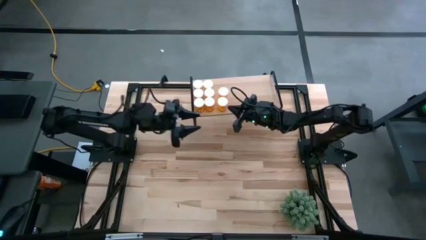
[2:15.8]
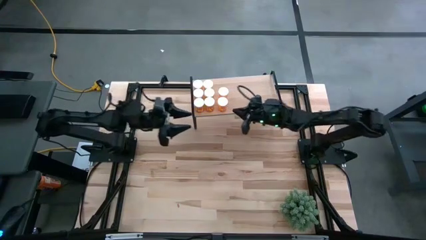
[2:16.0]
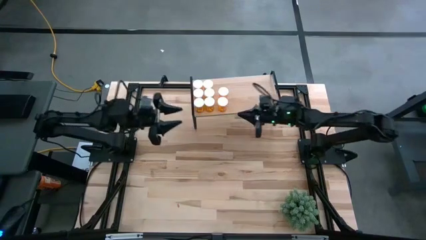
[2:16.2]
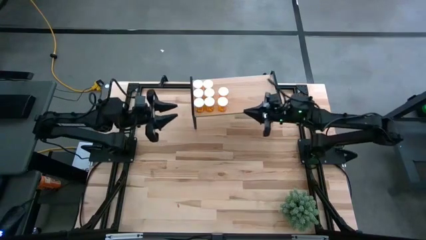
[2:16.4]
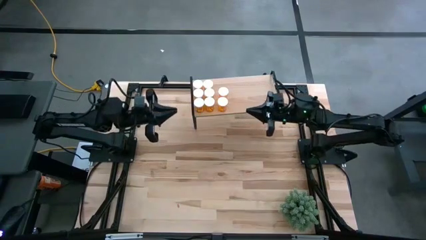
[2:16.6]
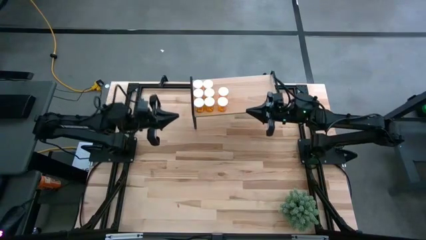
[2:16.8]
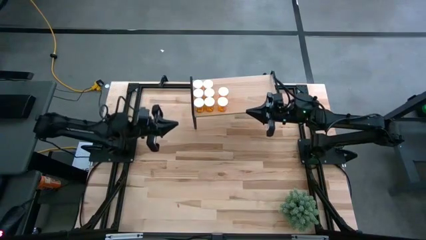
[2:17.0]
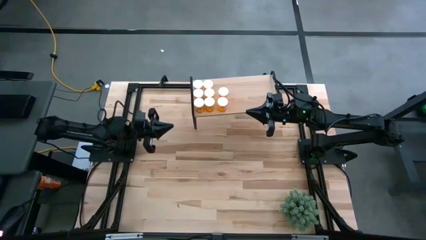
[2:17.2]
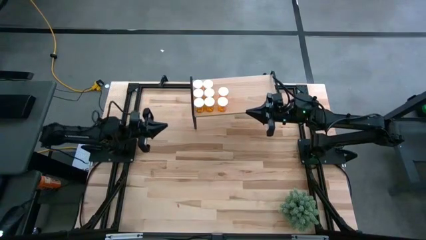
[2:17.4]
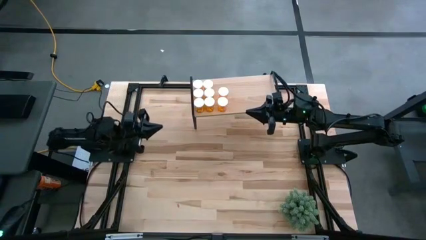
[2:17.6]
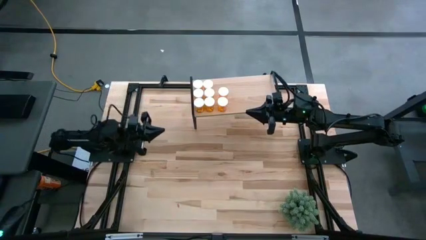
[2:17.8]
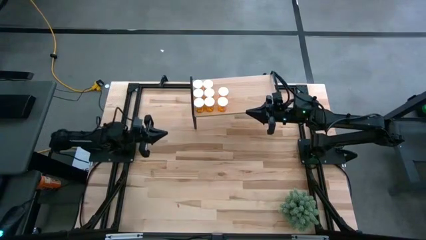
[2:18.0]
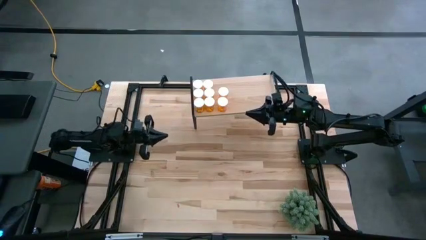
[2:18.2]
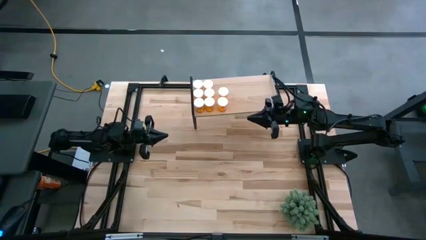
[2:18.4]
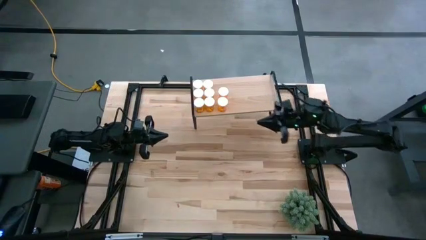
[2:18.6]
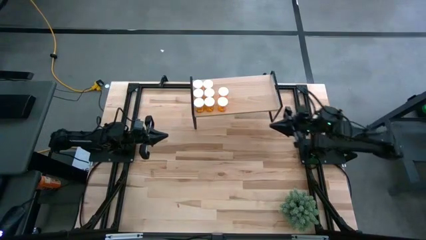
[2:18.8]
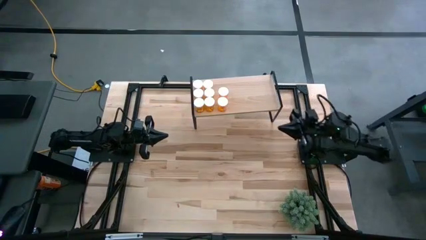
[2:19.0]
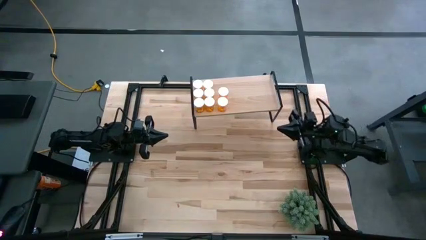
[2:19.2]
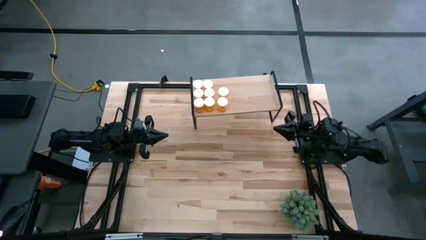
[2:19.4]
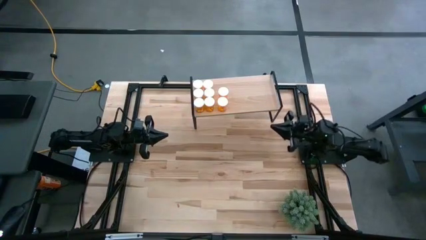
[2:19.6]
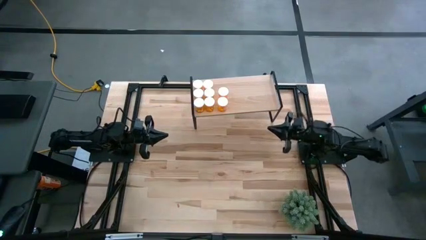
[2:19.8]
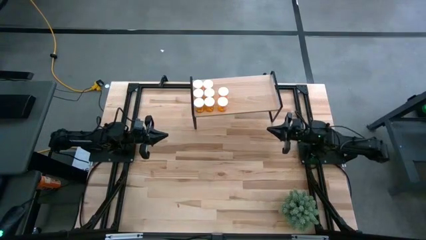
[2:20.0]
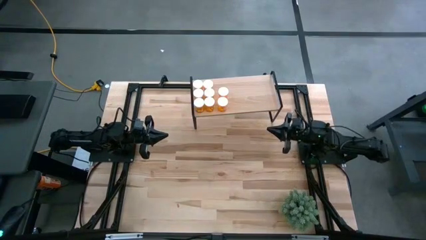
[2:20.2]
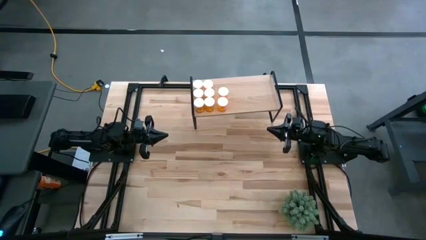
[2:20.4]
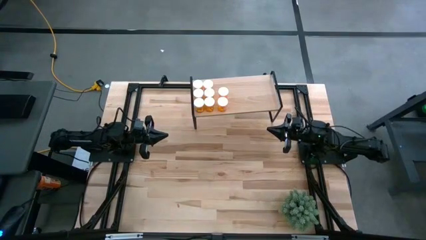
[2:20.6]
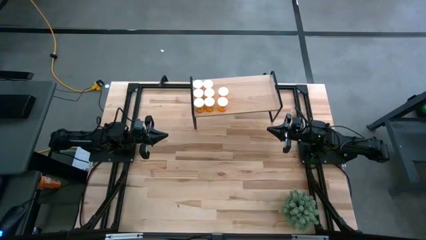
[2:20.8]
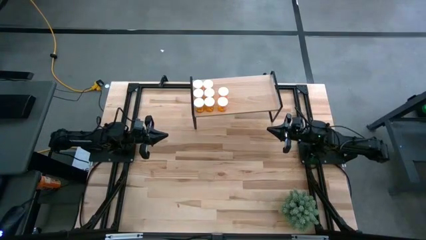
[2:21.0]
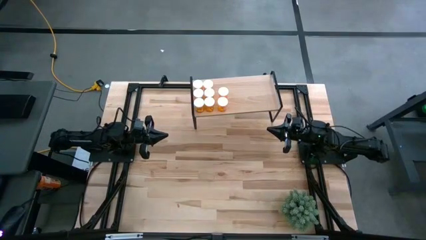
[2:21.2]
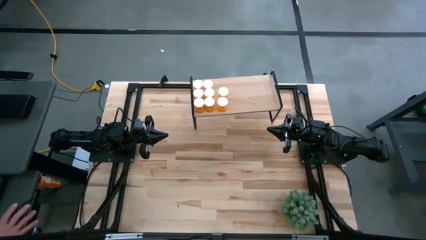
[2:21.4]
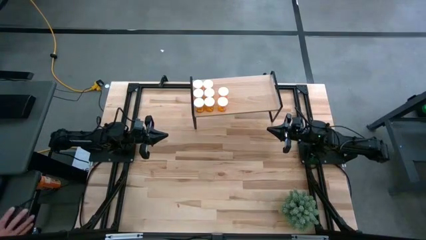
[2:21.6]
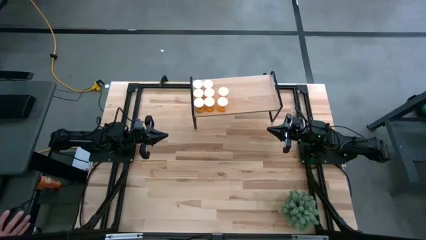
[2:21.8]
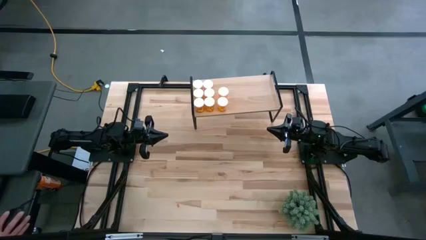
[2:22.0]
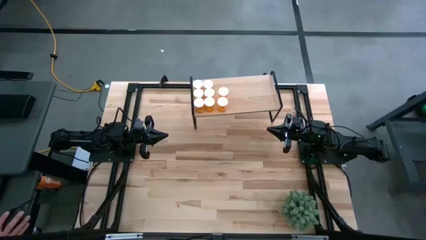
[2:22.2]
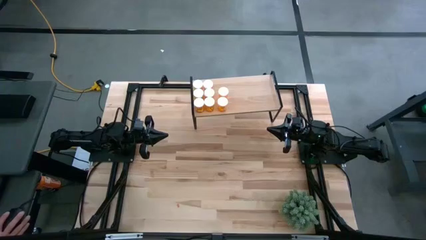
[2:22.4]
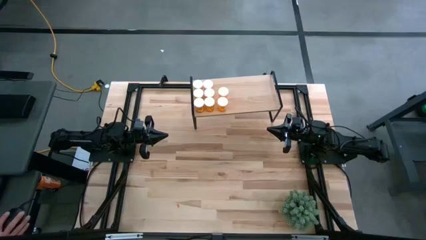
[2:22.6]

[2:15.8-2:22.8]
Task: Pick and place medicine bottles onto shelf by color
Return to Home Position

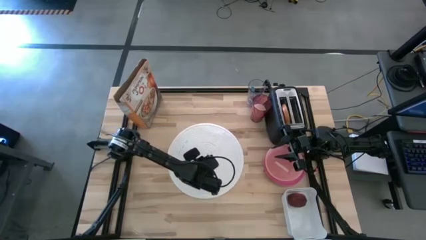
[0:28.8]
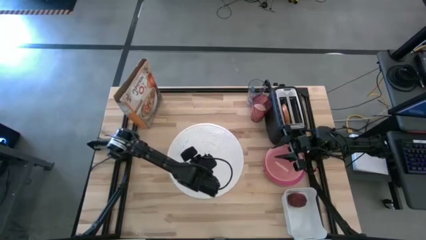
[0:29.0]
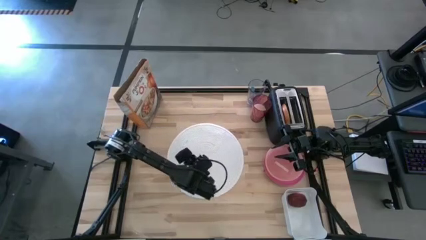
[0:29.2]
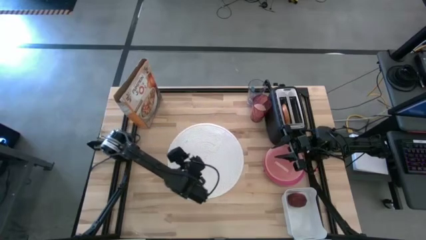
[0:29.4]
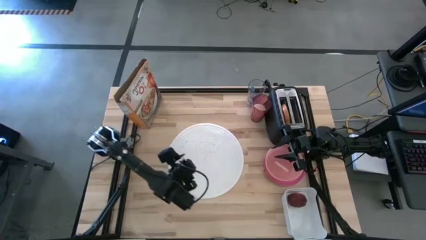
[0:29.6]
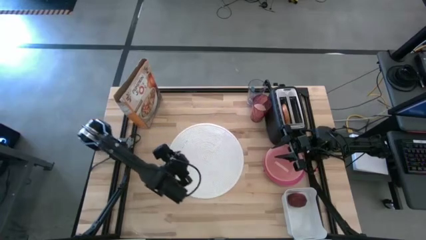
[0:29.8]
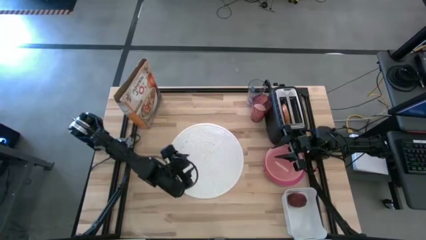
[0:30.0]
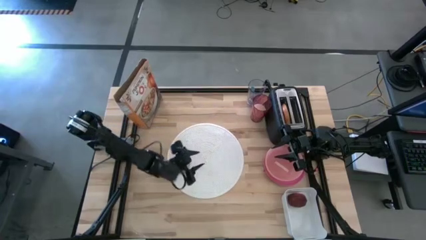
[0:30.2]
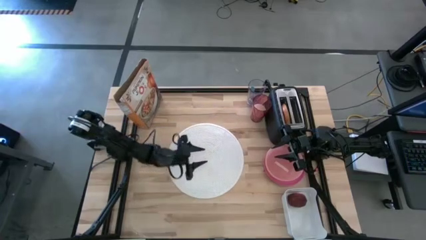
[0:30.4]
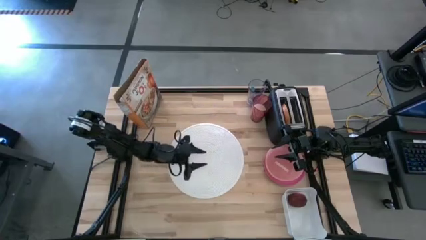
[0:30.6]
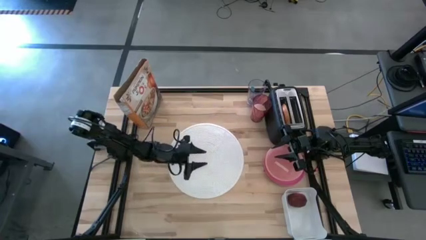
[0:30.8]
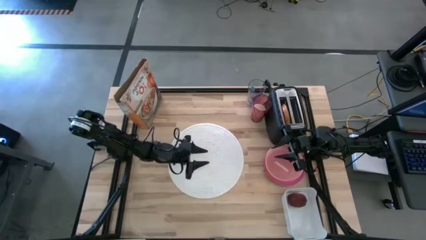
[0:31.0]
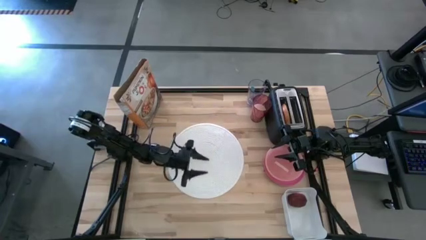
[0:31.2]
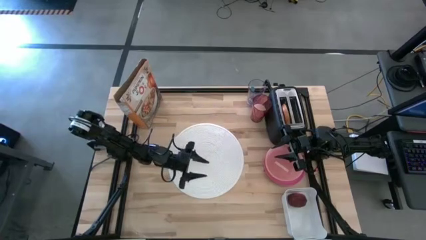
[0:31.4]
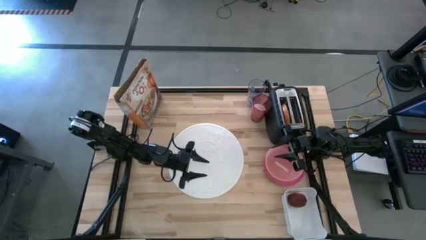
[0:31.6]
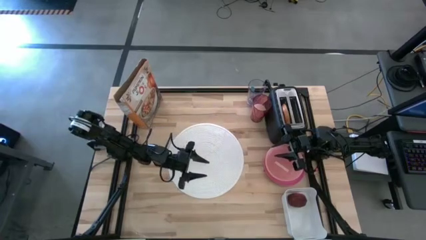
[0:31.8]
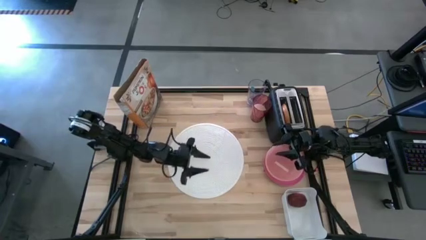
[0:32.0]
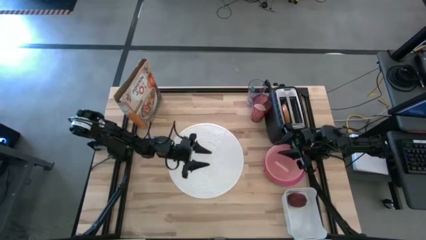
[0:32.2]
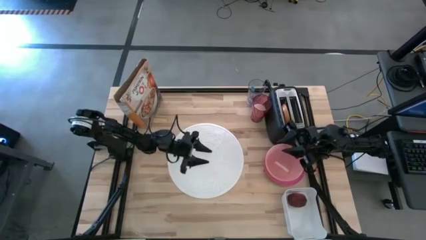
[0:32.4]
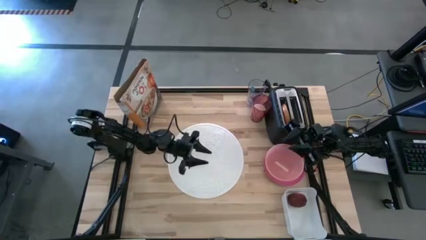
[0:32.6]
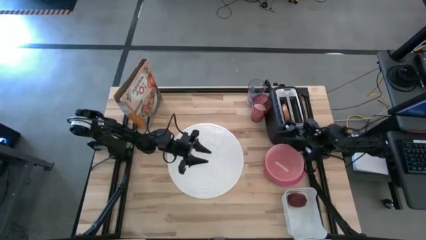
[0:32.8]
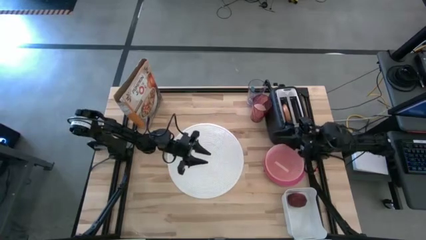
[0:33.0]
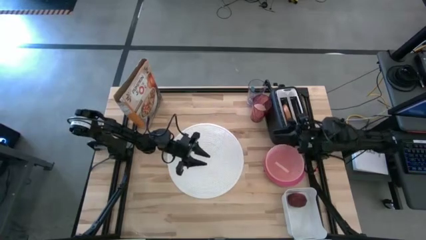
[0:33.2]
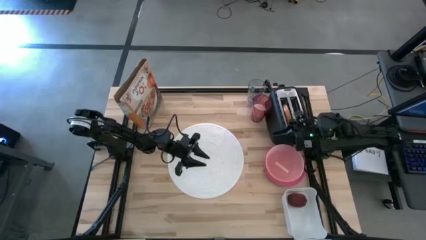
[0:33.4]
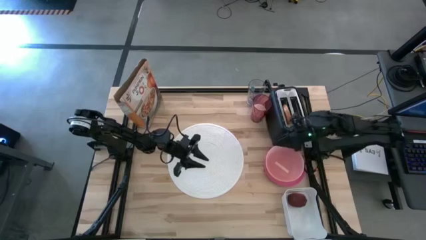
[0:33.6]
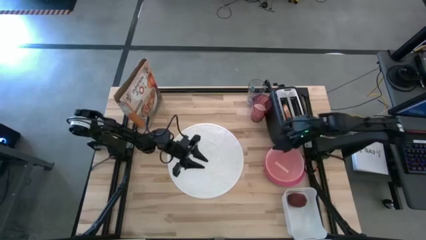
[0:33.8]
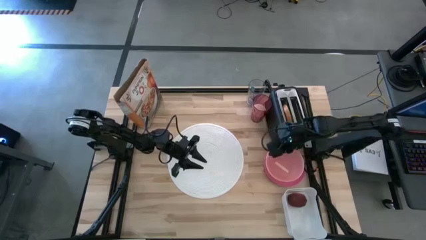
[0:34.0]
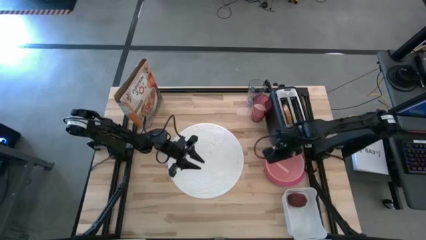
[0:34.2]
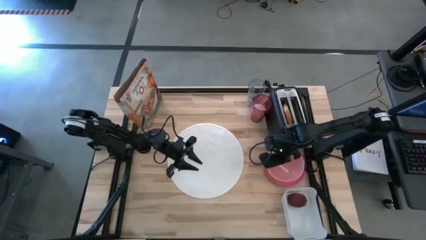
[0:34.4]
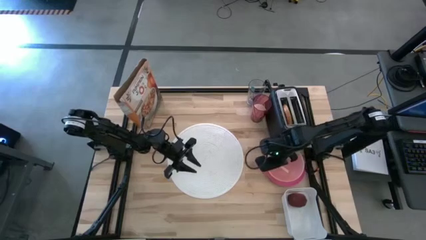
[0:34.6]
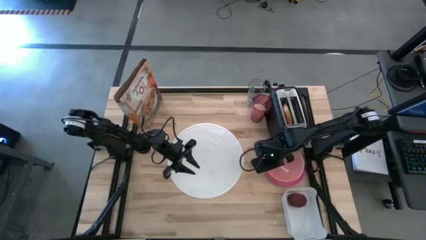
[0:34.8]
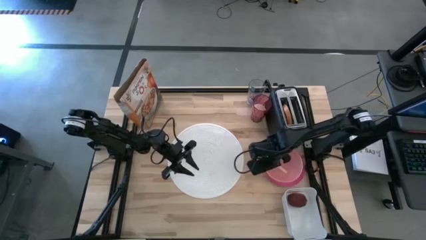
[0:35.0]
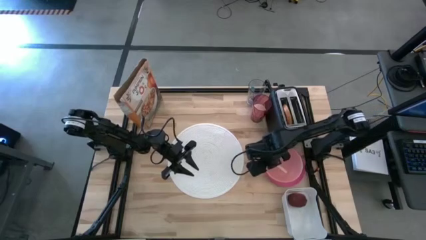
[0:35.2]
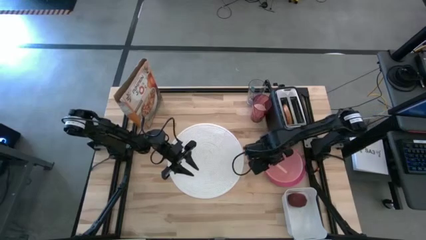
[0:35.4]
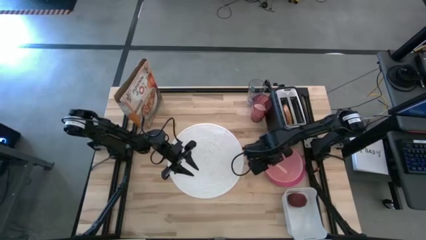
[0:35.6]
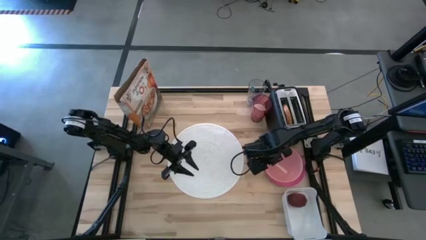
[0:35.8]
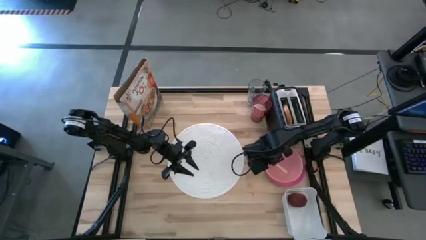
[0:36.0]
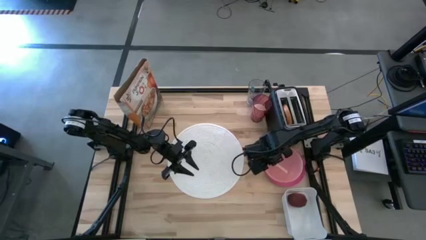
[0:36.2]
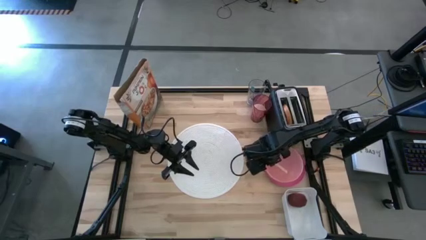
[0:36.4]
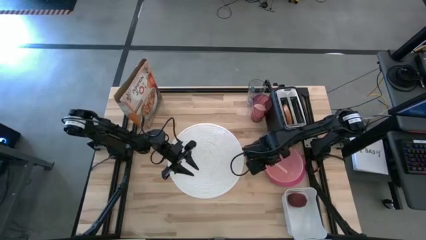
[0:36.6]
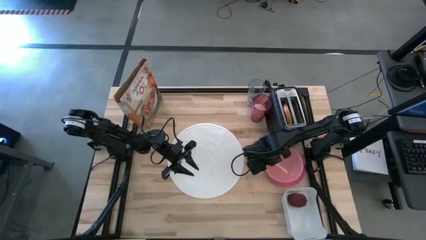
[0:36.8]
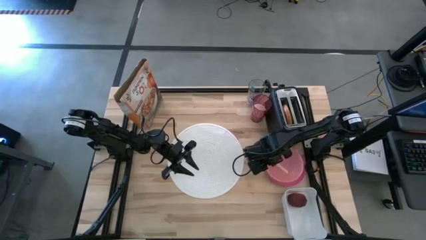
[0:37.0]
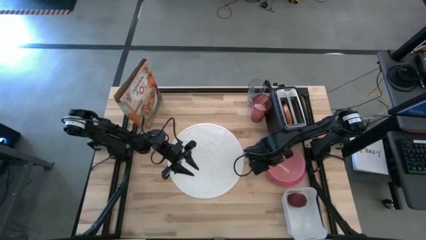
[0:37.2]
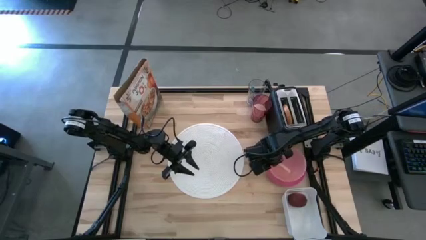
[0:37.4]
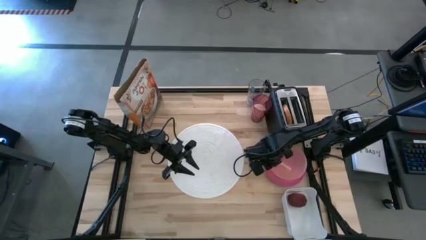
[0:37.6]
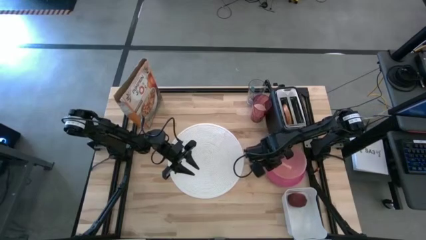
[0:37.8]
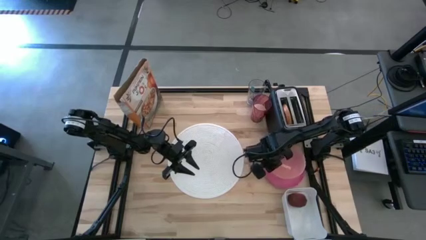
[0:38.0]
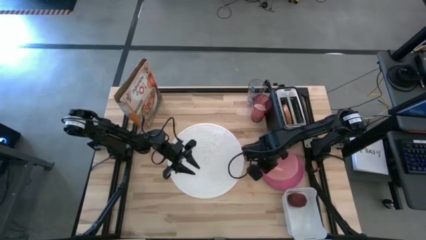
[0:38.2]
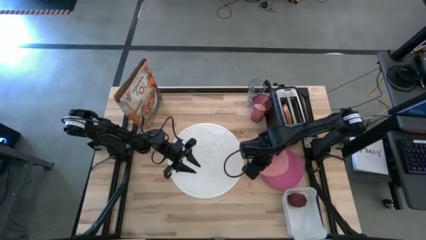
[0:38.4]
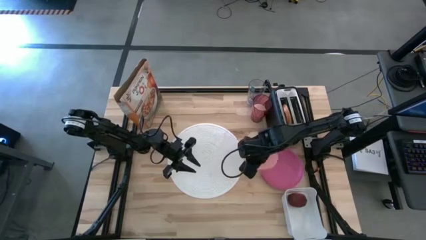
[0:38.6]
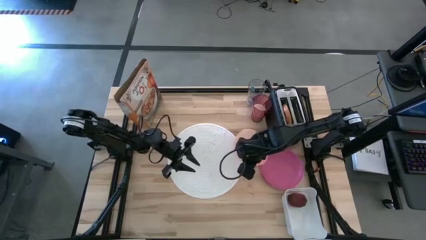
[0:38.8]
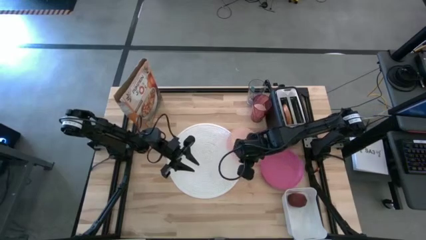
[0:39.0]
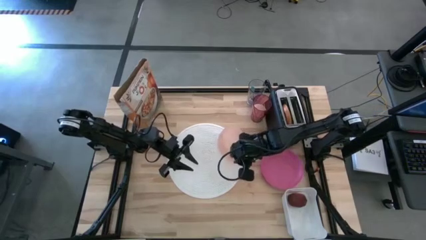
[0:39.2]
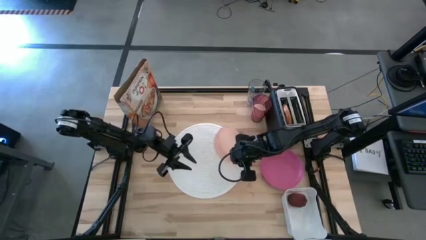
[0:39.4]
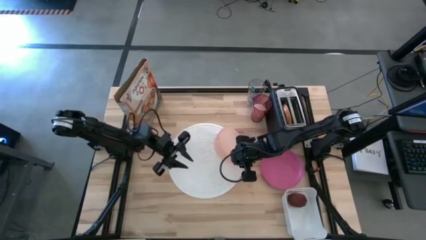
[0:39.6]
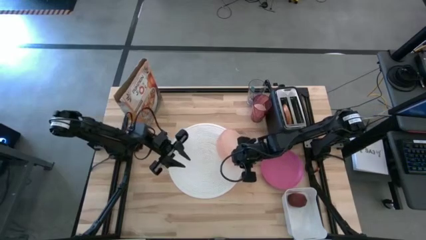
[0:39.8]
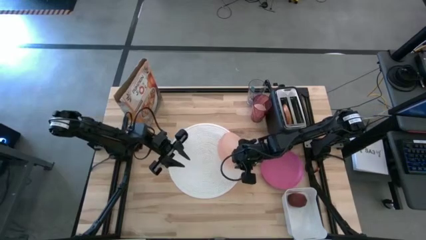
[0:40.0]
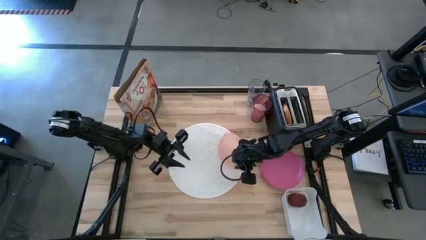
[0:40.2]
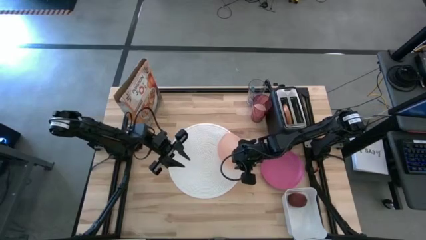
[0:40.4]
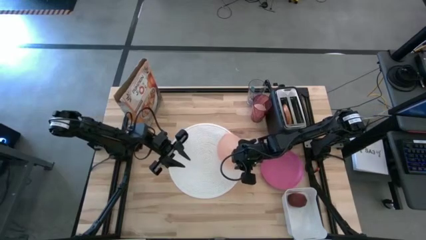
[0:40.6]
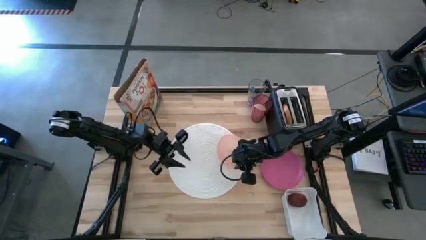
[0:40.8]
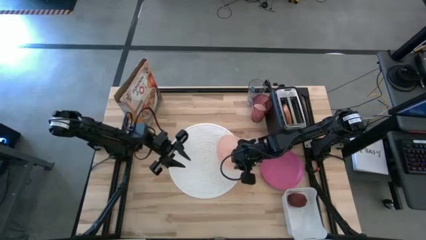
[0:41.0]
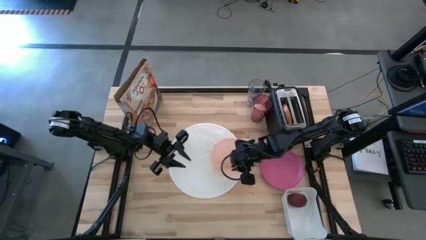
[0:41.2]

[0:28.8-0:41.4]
Task: Arrange a breakfast setting
Put the orange bowl on the white placemat
